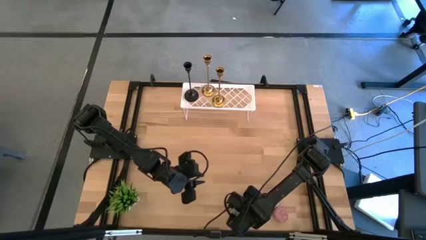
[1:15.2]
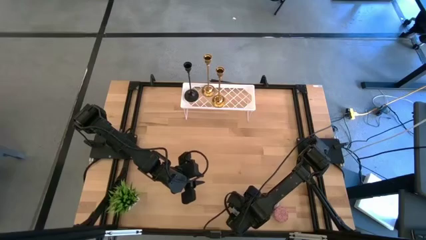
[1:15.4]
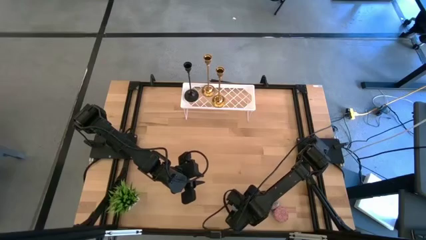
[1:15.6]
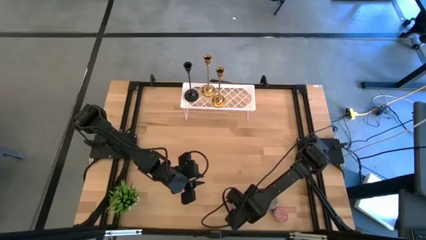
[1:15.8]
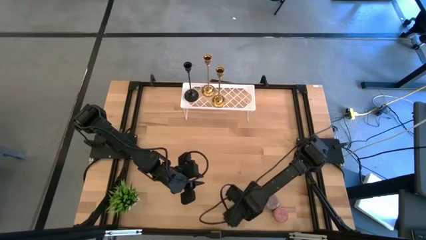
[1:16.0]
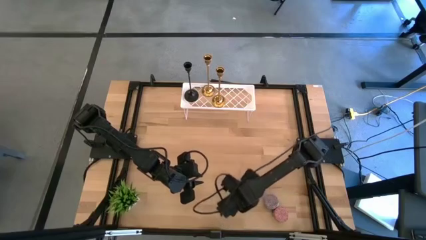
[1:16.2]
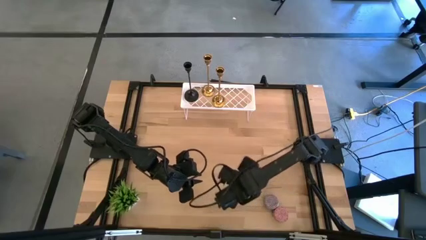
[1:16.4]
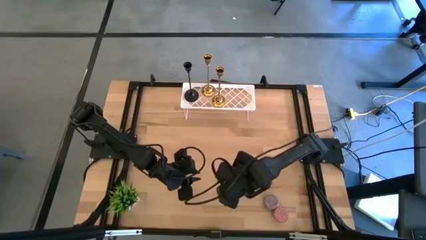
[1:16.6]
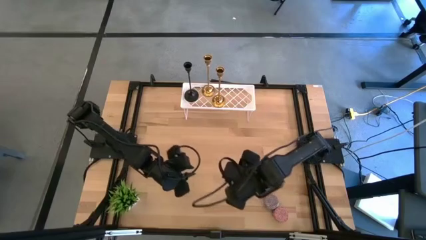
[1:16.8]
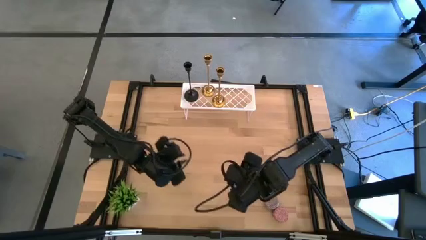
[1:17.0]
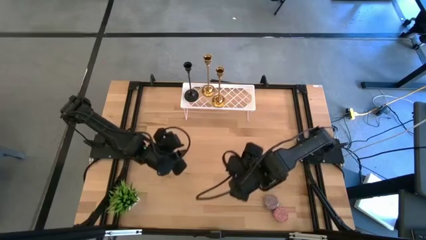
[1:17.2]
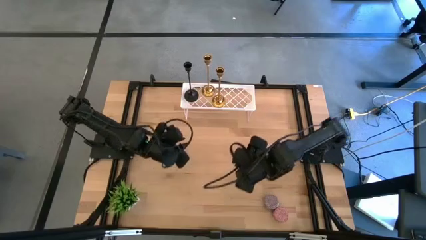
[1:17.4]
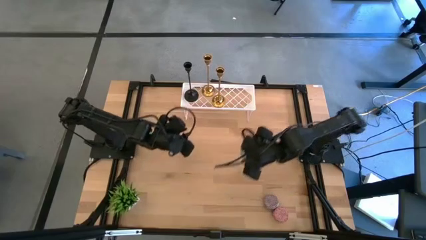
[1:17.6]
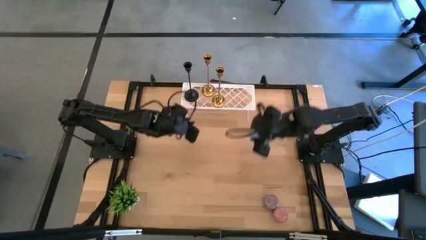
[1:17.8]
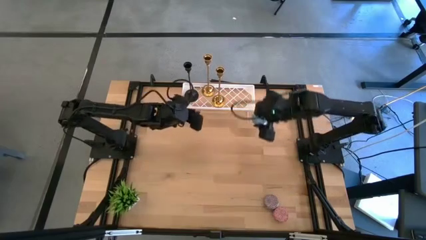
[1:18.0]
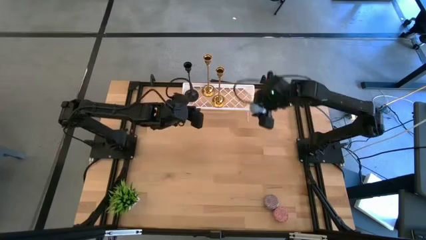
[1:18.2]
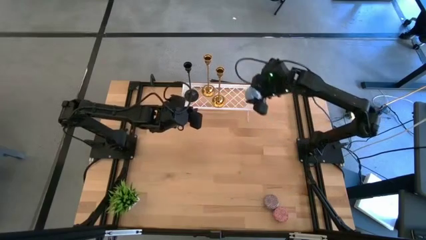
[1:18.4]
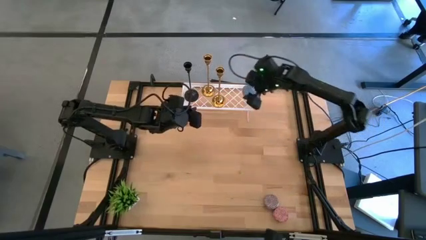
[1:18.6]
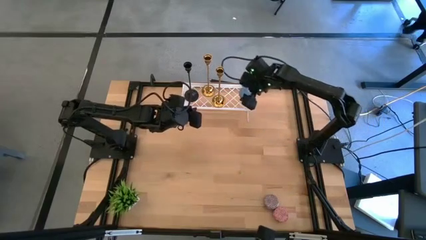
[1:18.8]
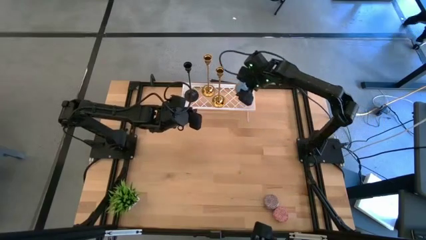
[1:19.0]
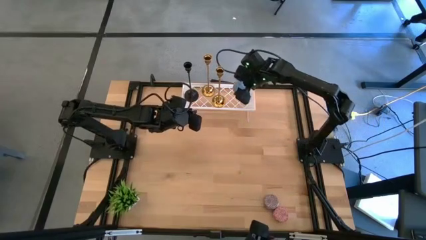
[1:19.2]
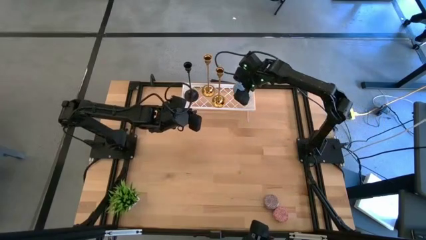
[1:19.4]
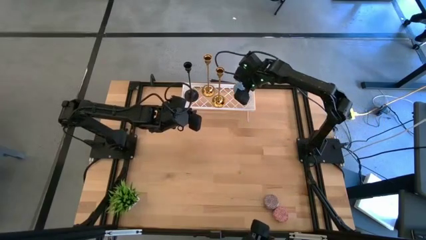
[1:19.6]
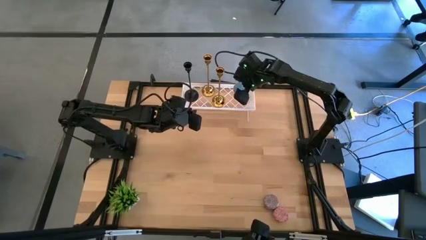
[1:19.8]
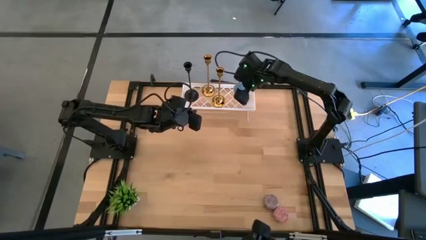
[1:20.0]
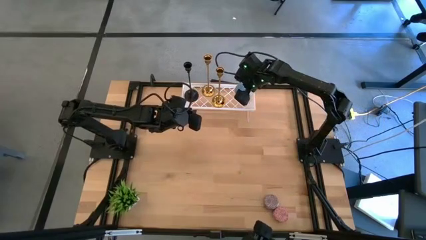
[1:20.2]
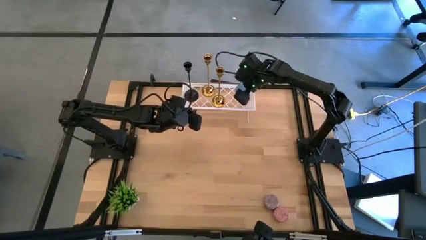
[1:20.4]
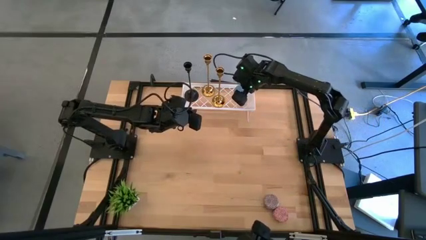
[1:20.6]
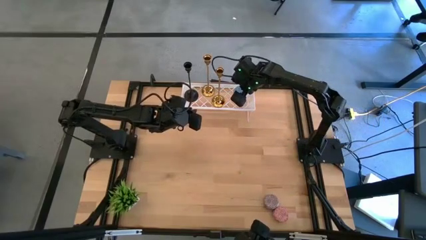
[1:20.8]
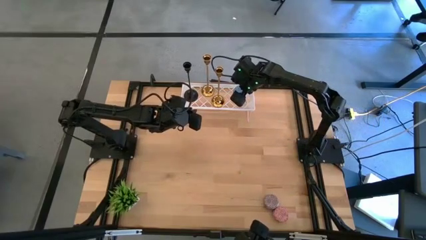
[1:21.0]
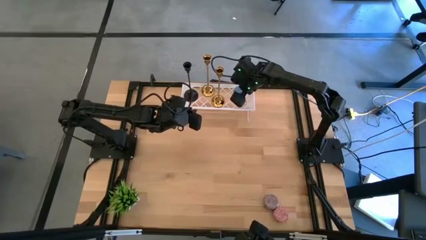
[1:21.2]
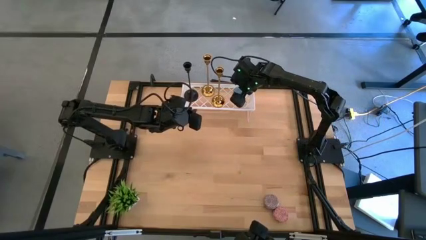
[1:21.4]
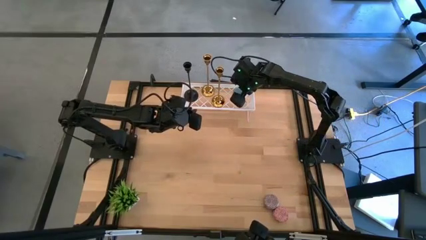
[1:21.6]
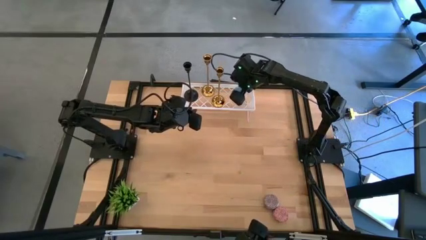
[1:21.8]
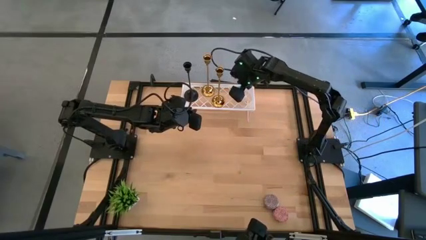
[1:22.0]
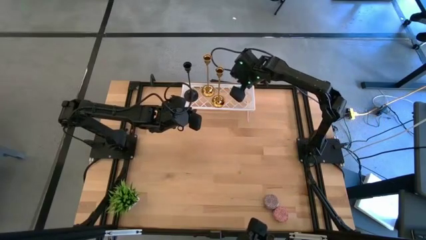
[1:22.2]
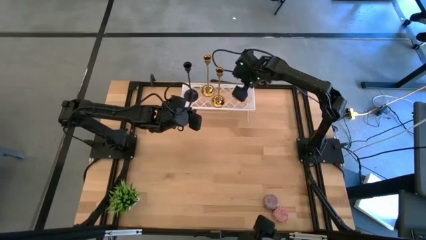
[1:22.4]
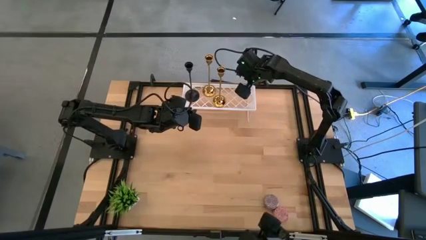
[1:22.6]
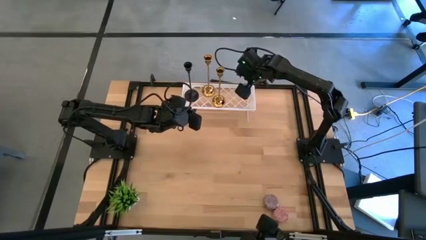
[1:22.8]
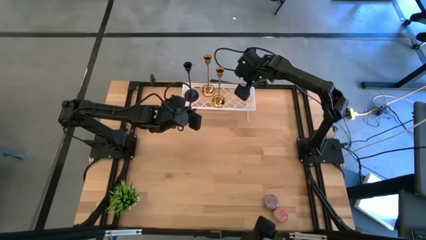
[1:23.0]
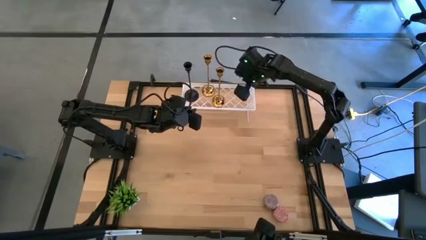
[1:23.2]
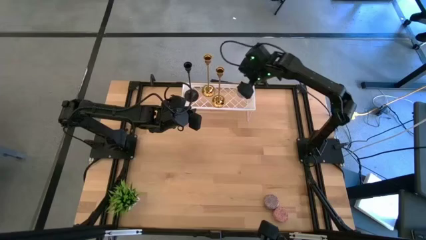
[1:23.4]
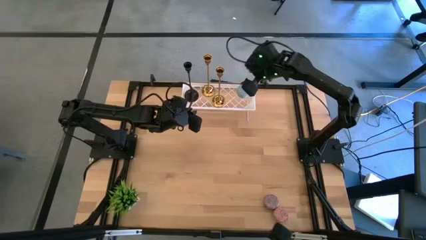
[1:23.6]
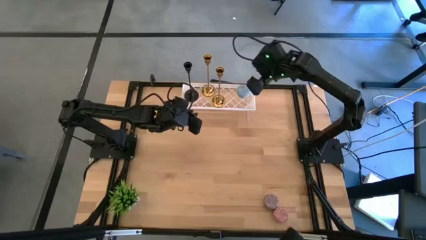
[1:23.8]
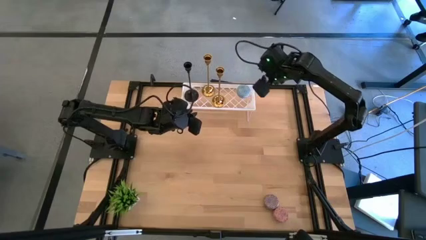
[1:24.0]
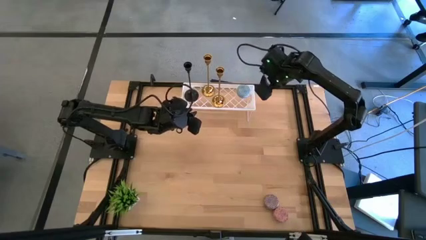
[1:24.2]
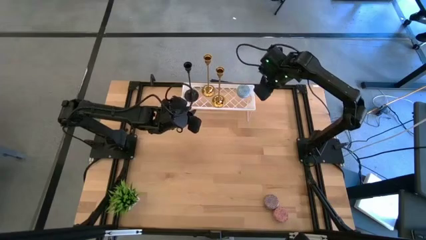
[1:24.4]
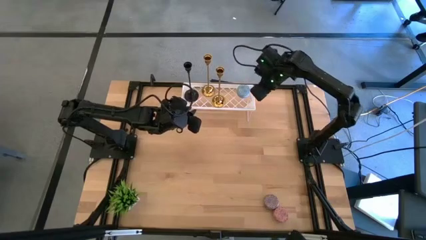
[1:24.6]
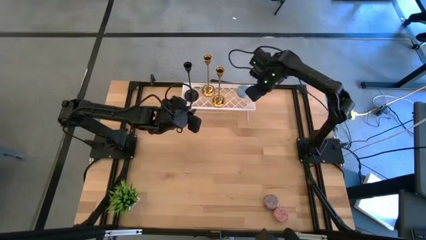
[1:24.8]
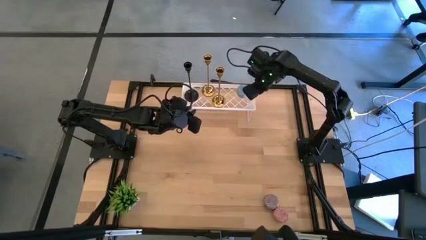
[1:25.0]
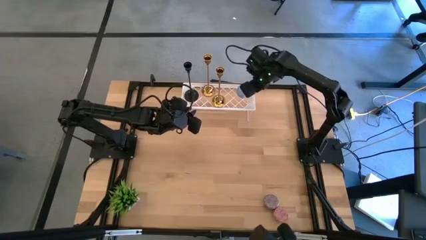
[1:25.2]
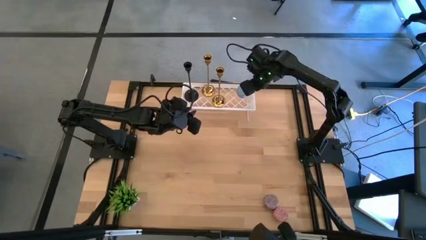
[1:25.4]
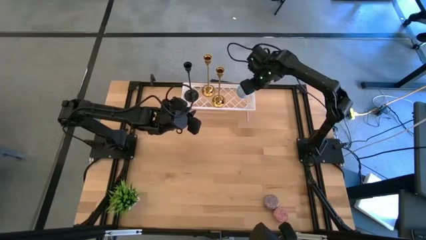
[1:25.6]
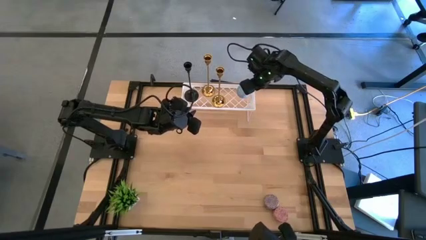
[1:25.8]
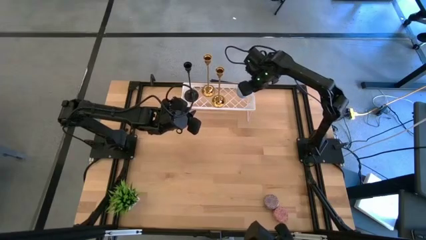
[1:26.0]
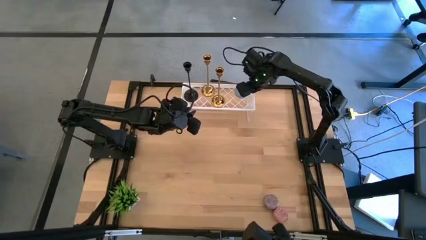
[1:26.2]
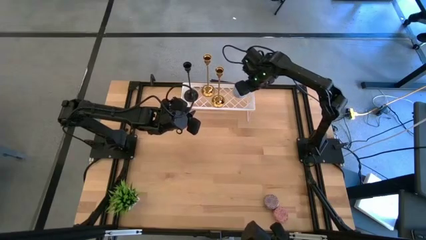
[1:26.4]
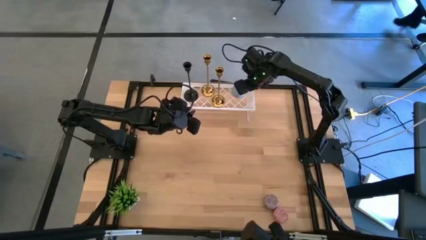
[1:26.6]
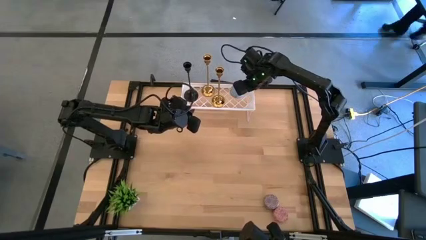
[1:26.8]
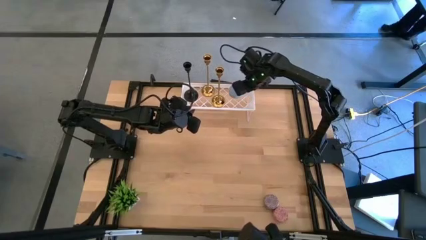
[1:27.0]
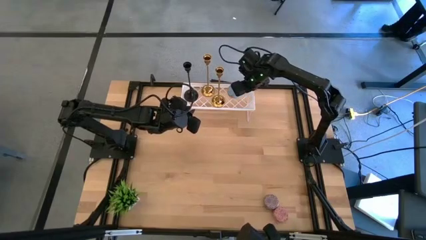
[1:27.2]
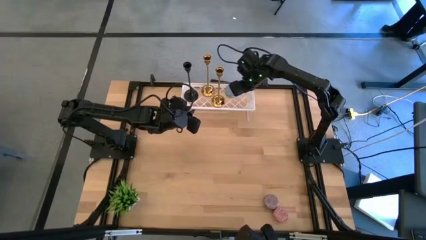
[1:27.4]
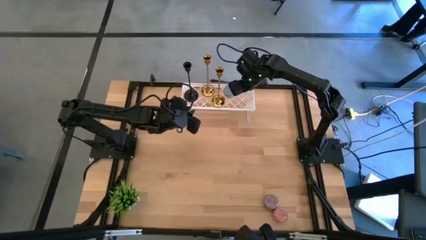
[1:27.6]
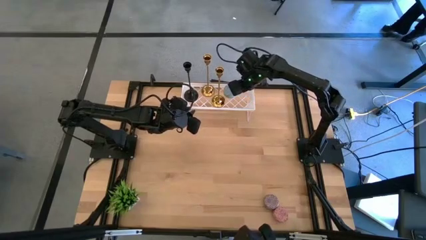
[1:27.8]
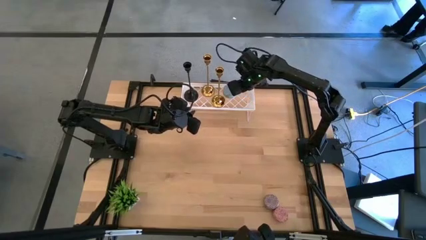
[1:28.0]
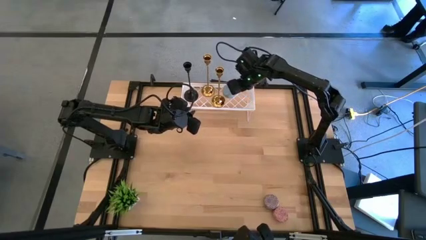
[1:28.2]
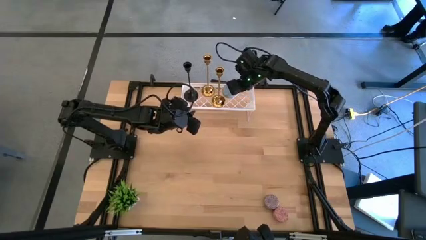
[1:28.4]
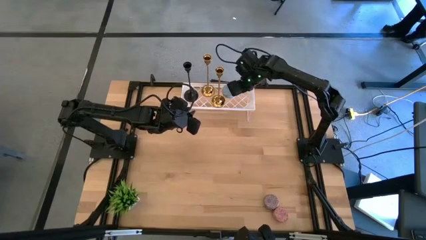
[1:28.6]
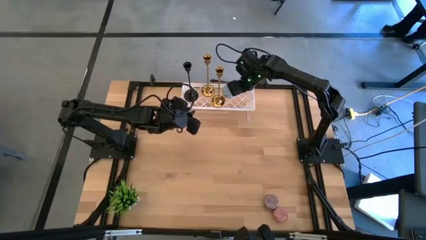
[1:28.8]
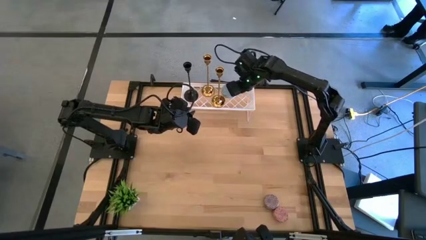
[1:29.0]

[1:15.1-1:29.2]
Task: Pick & Place candle stick holders
Put the blue patterned scented candle on the shelf
